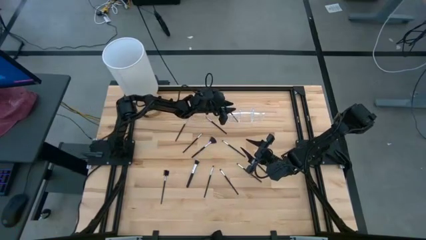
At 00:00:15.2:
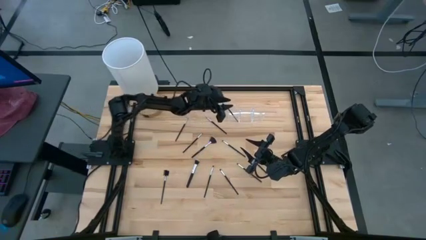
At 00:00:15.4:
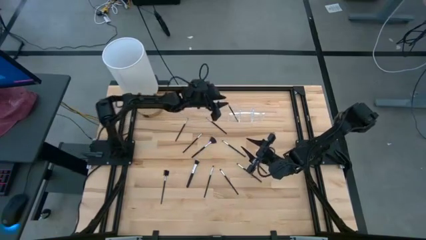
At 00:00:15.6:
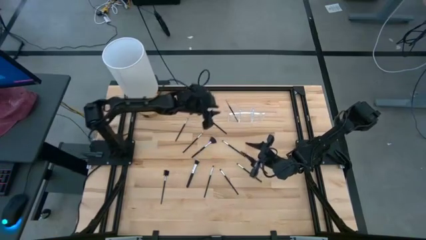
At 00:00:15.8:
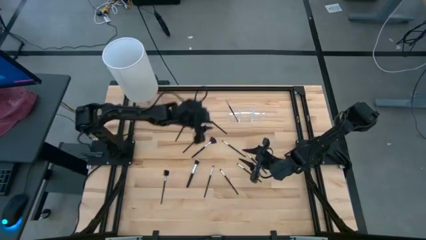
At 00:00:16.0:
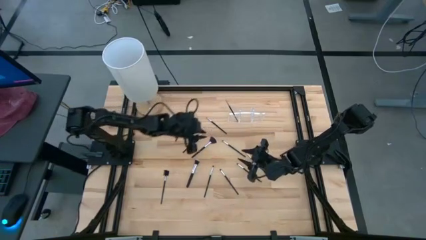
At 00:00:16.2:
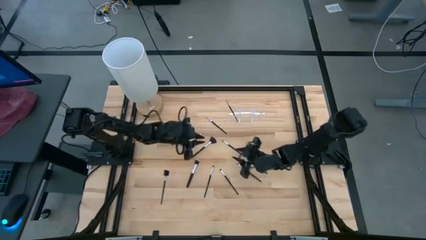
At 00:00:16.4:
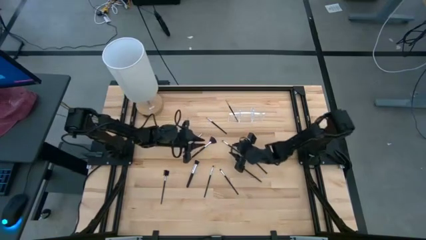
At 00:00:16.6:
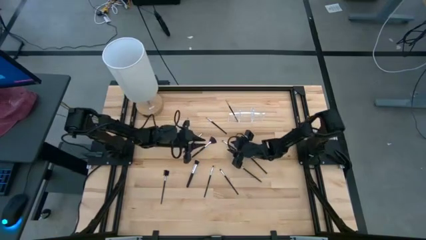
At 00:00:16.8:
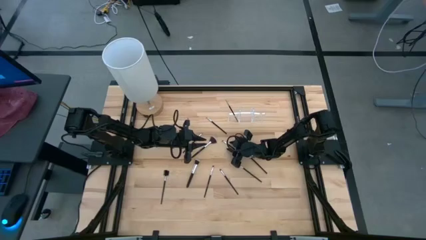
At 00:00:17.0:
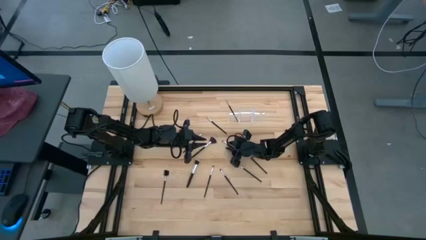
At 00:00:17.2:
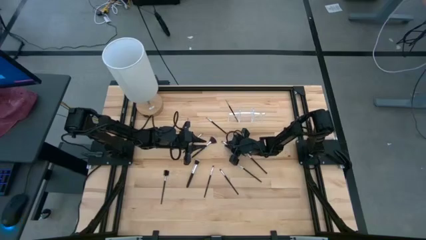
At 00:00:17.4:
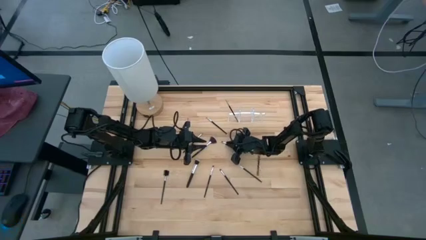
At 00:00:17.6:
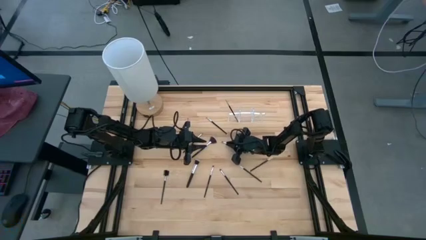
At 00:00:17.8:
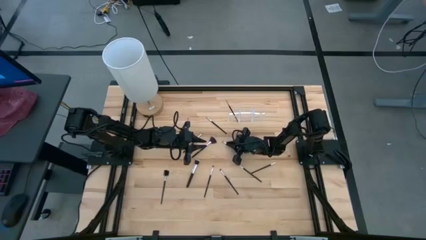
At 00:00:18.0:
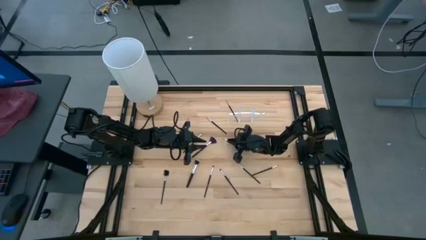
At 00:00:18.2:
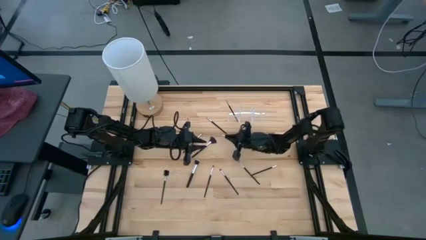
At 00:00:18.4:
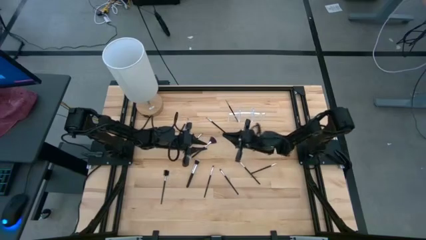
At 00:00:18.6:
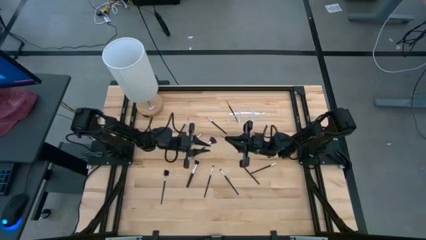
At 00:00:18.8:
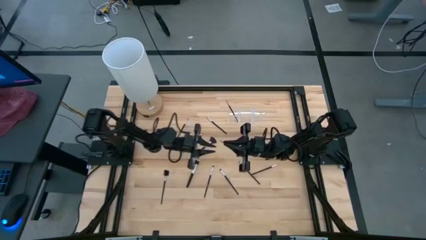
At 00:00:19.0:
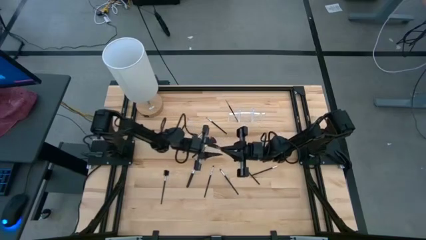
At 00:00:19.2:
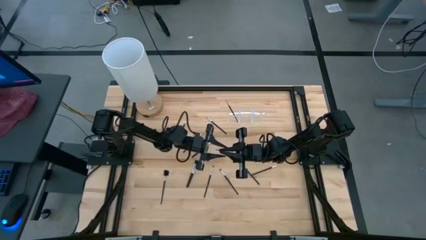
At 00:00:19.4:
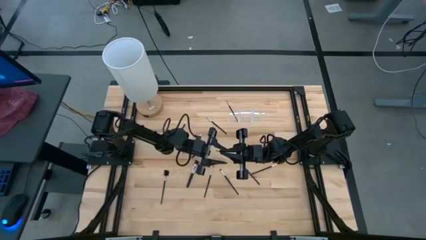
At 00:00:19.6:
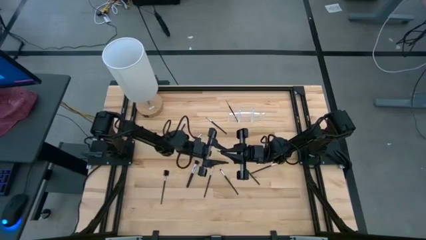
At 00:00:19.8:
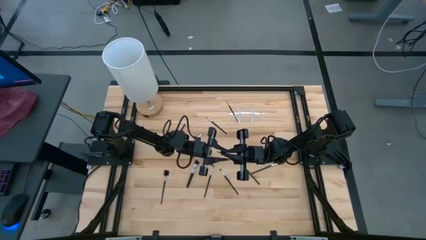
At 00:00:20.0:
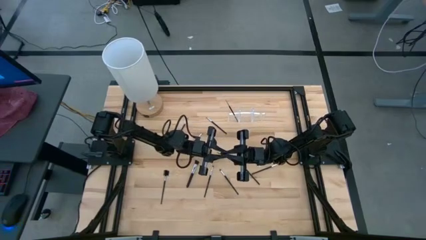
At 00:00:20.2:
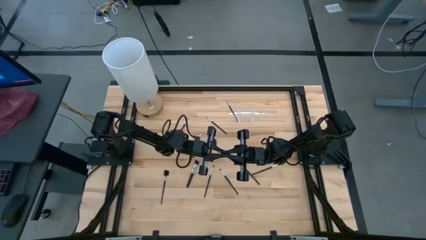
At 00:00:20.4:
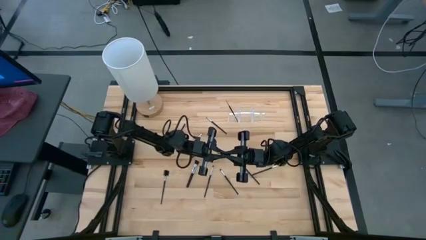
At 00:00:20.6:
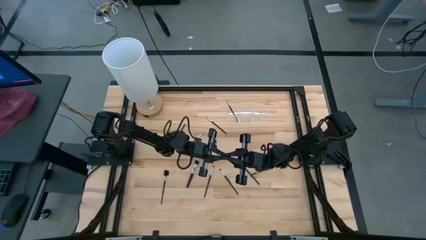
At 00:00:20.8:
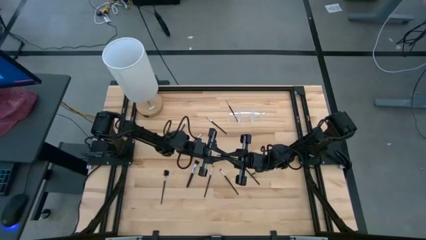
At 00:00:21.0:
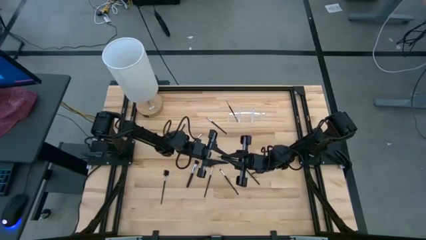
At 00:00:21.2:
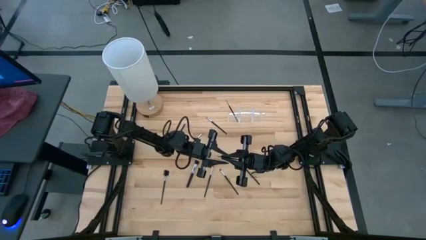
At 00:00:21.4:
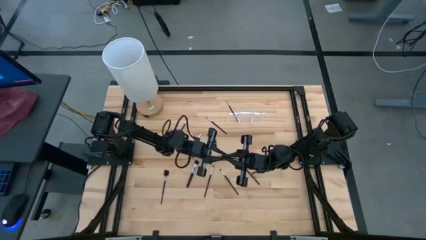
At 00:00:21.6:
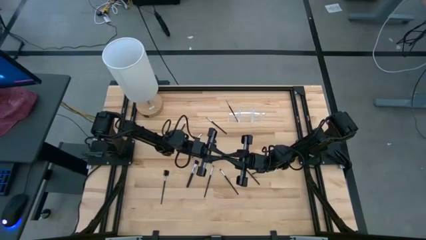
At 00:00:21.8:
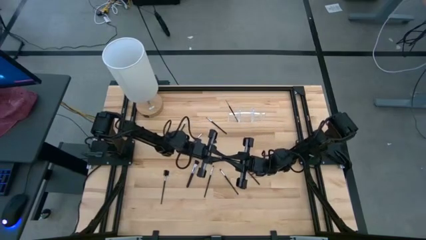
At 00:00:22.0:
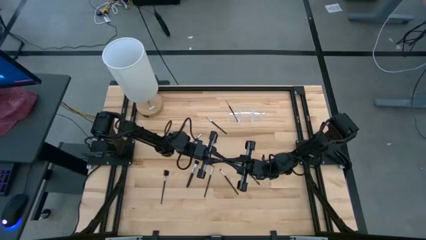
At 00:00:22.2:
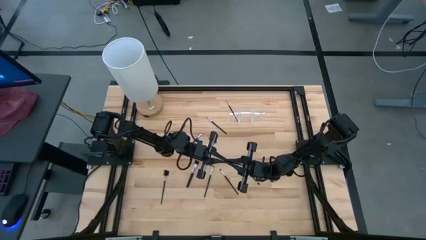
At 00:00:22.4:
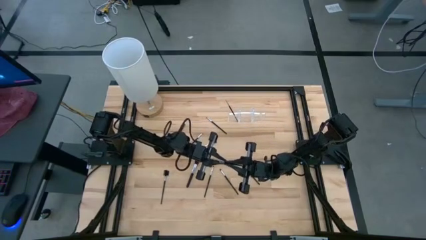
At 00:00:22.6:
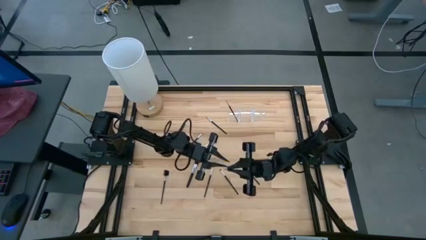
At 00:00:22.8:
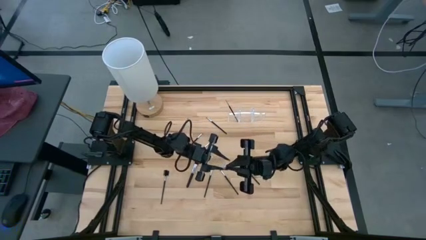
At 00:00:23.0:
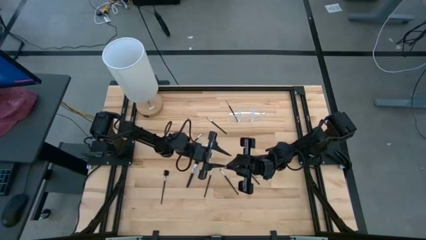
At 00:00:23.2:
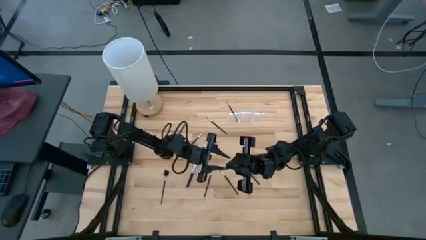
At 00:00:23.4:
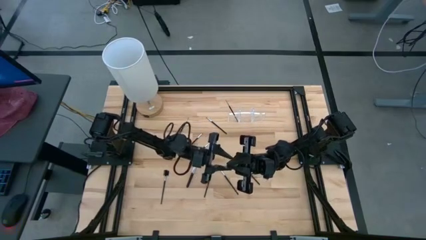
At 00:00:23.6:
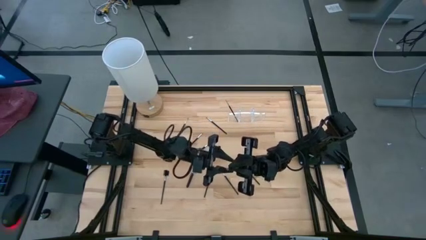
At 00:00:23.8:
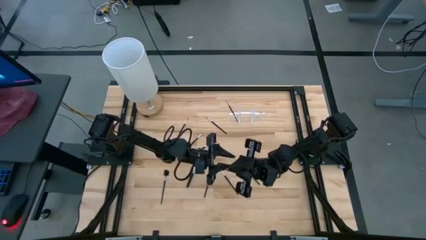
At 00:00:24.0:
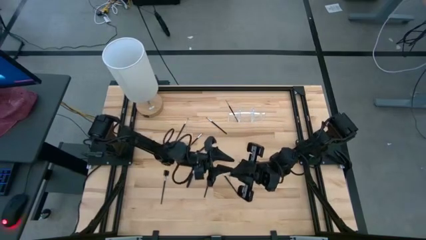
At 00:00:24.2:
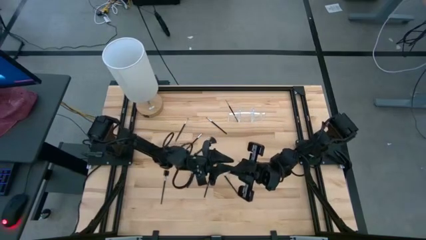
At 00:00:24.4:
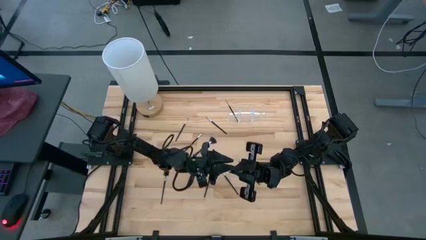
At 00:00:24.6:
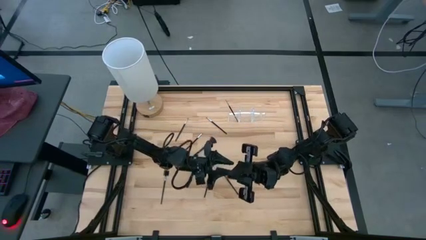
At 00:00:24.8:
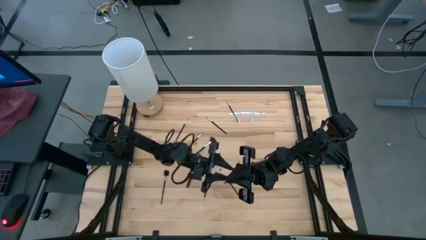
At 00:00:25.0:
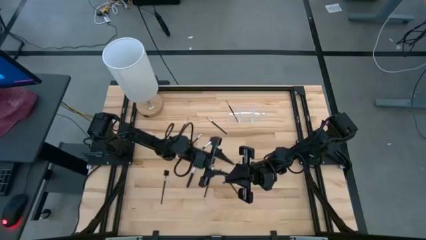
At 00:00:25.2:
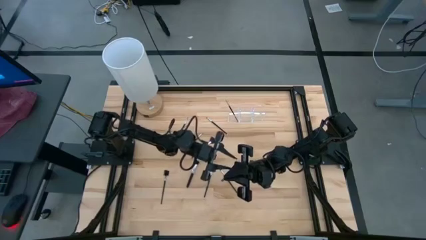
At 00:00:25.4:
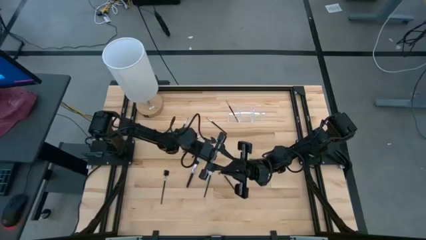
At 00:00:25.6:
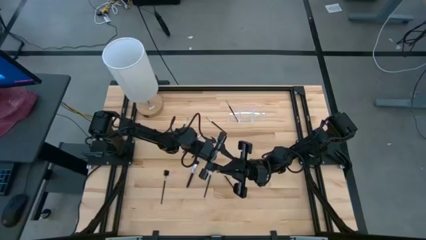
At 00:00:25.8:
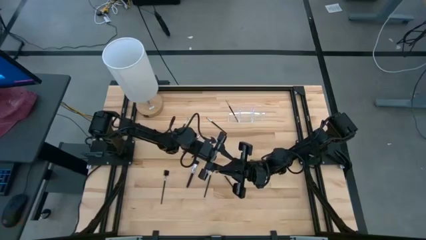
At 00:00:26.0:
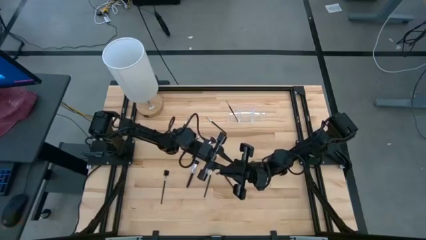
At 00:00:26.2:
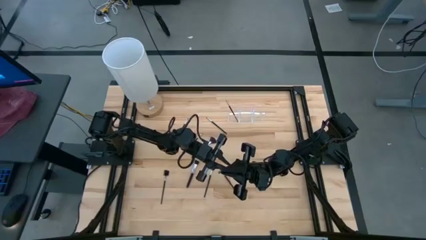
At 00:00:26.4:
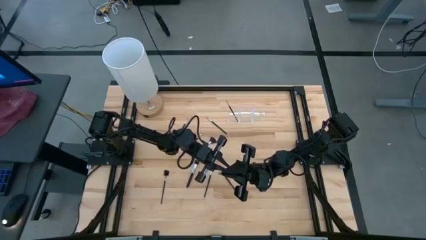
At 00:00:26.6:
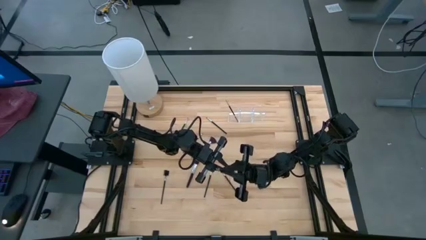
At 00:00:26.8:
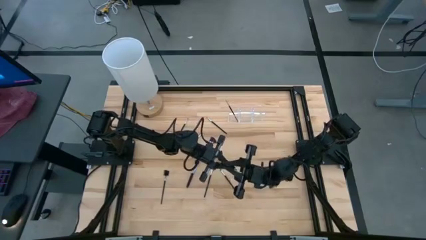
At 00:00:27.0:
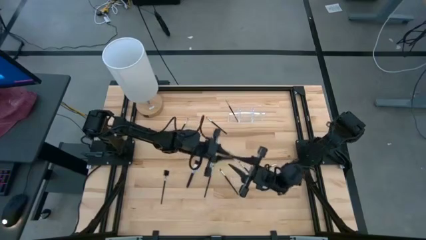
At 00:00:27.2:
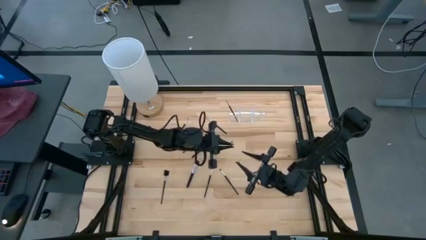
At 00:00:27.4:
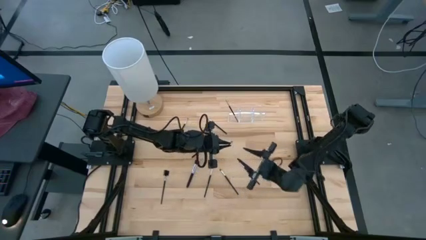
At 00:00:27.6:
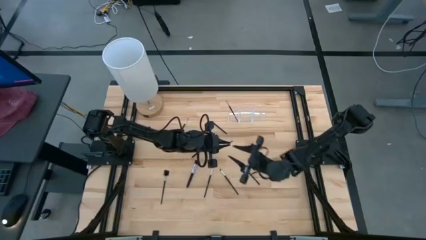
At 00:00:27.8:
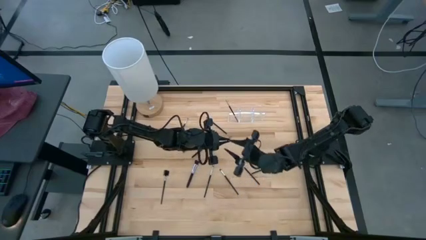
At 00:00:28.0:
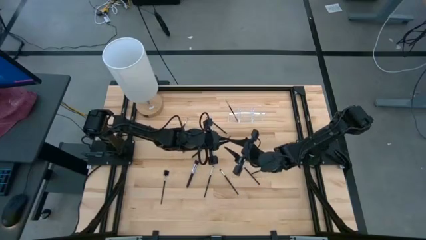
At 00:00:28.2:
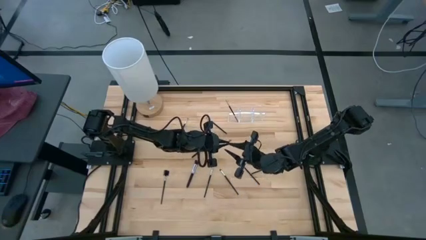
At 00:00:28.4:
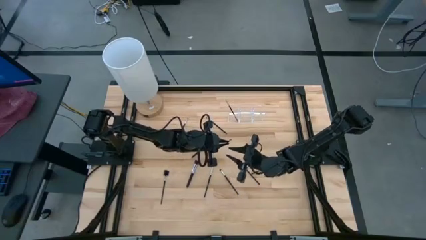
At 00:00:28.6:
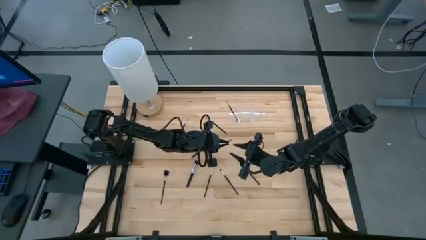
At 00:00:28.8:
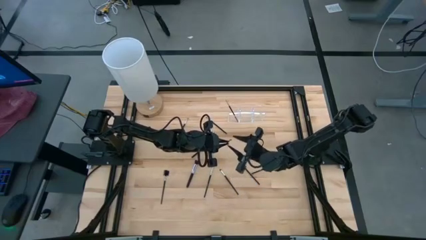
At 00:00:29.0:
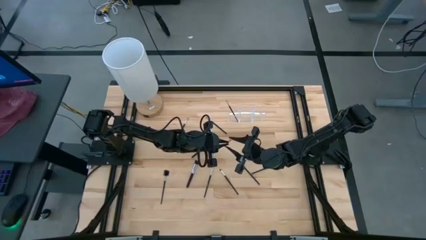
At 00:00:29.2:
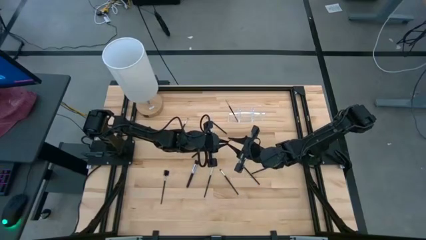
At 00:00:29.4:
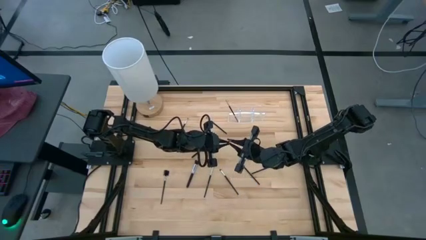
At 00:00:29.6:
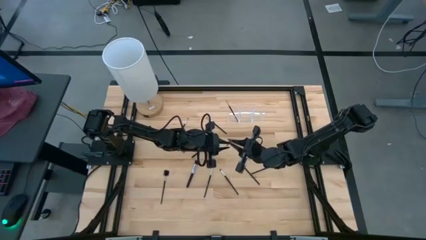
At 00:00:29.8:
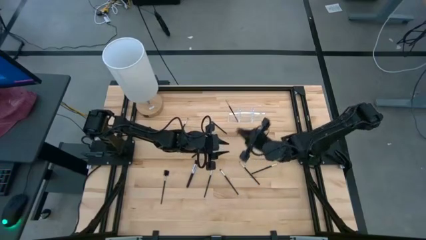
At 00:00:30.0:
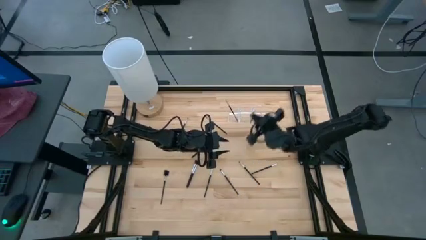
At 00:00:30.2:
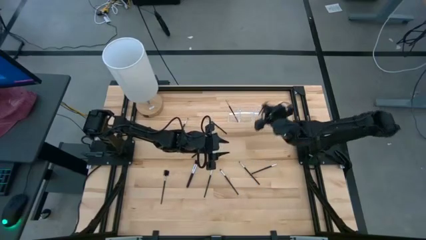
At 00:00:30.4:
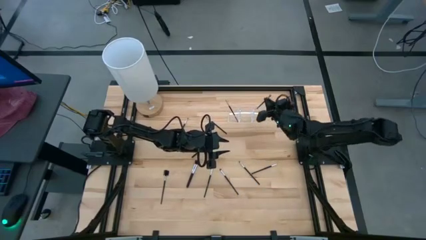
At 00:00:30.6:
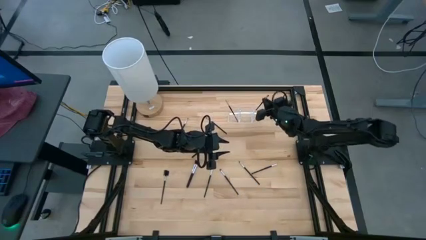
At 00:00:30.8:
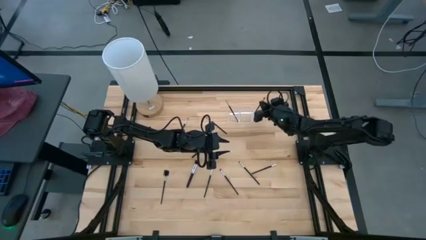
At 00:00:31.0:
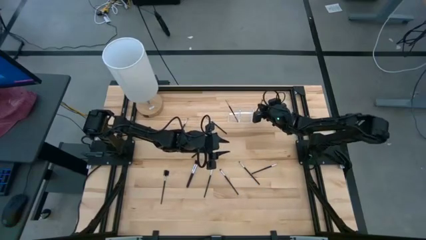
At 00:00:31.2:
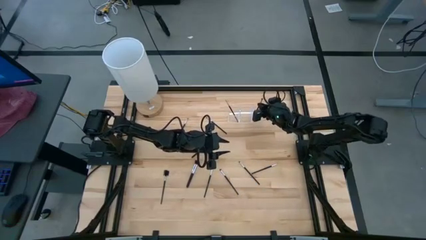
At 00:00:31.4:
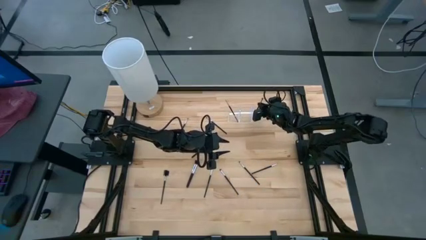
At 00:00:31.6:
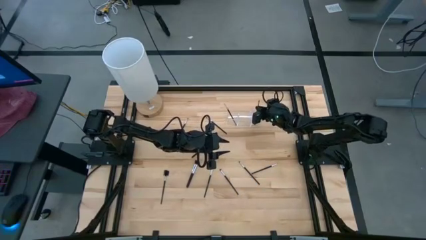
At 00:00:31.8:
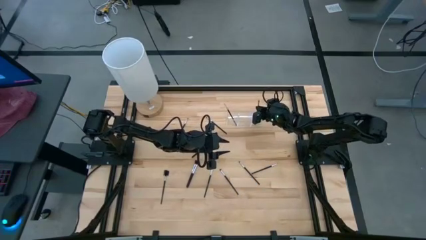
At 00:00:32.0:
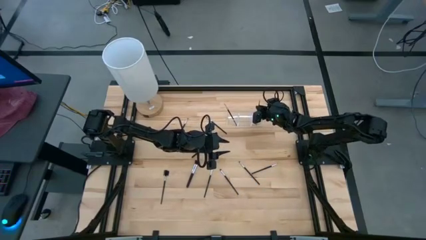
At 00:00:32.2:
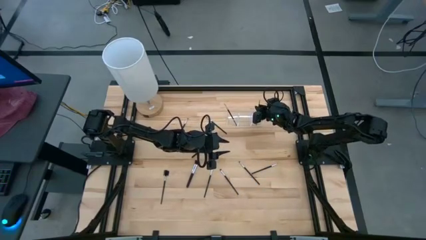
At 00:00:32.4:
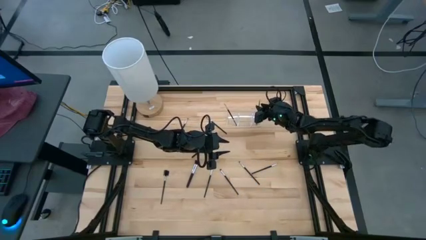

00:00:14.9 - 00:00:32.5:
Task: Put items in baskets/containers
Put the black eyeshadow brush into the transparent organizer
